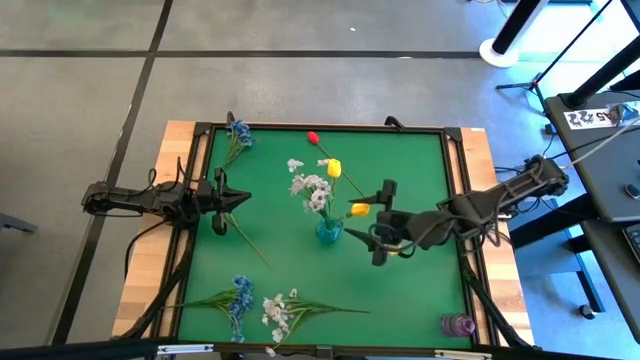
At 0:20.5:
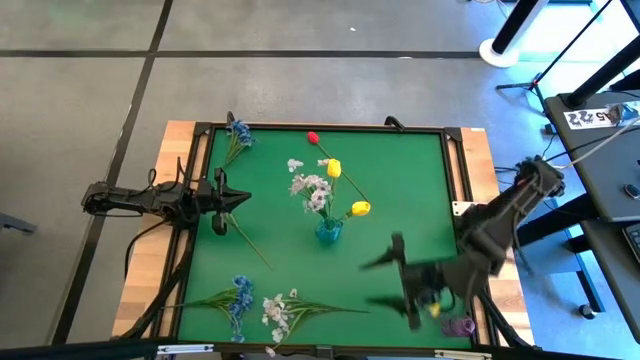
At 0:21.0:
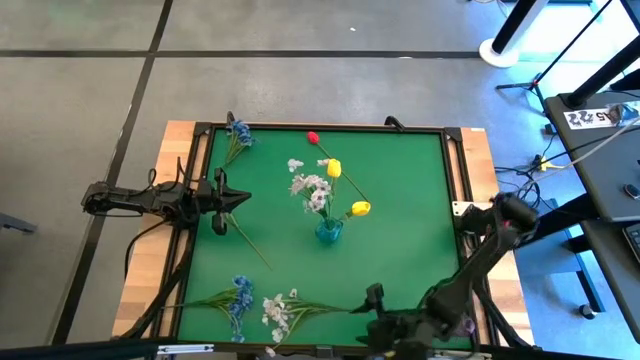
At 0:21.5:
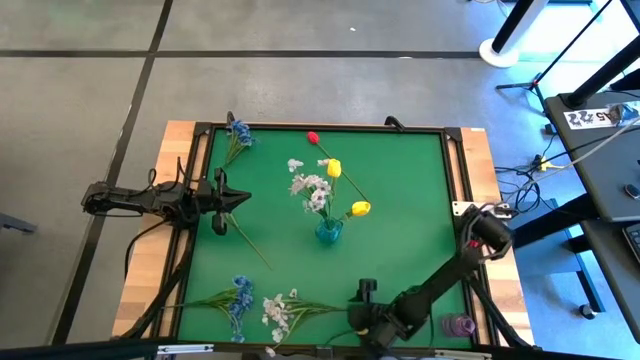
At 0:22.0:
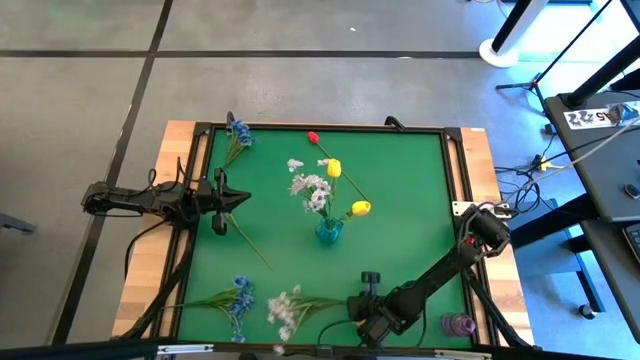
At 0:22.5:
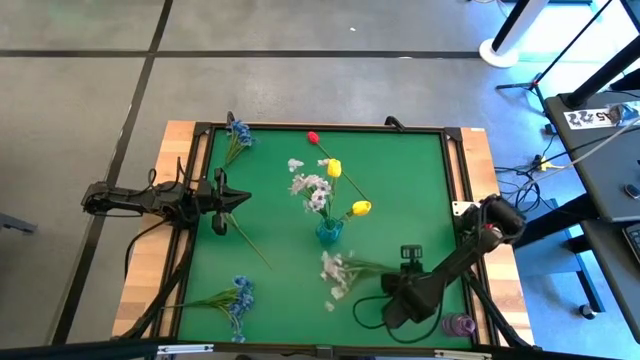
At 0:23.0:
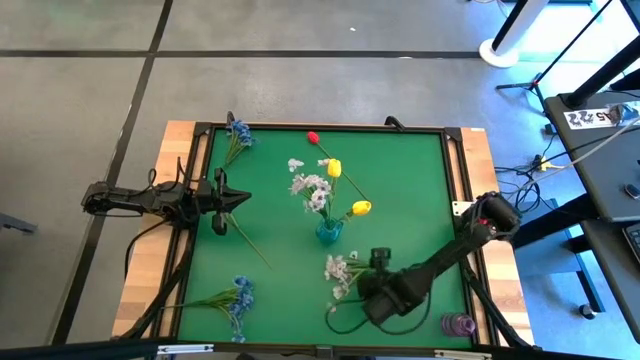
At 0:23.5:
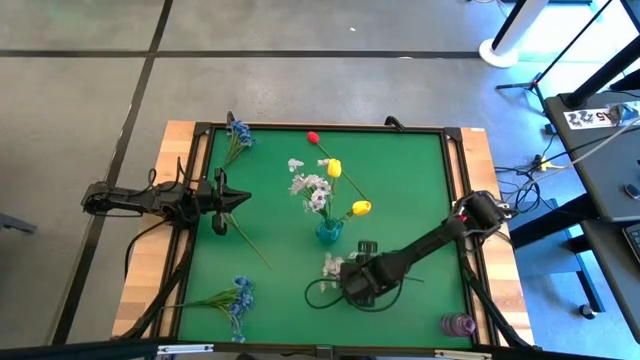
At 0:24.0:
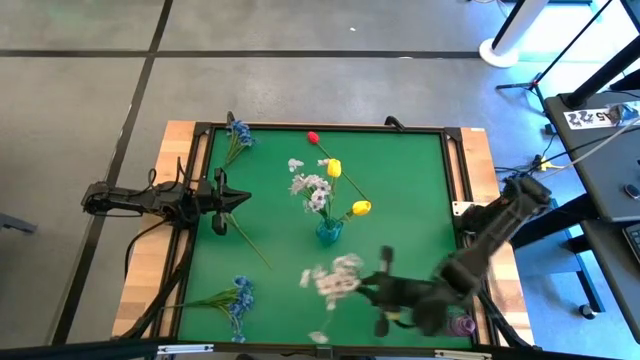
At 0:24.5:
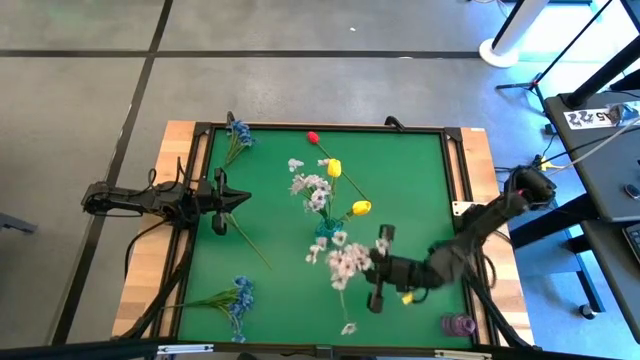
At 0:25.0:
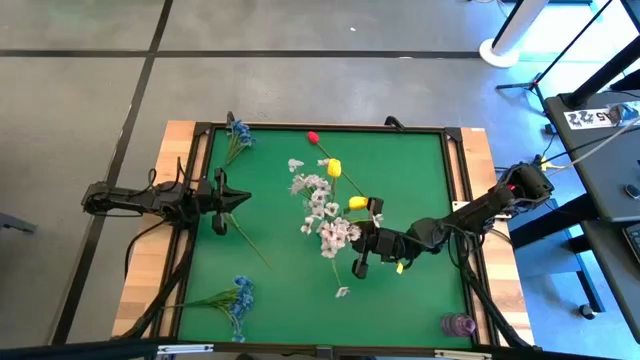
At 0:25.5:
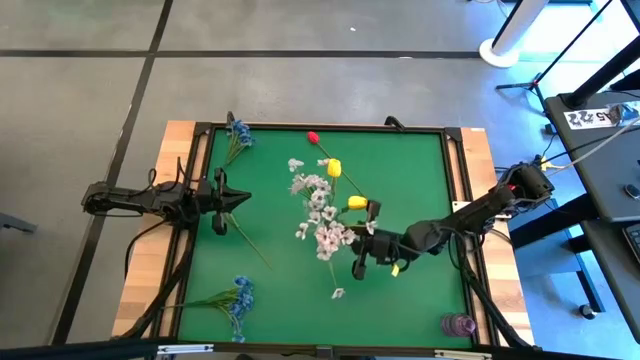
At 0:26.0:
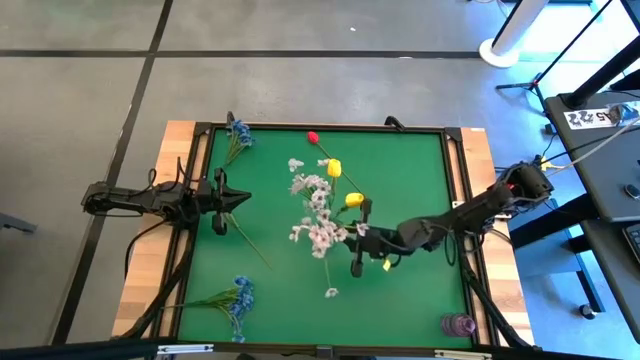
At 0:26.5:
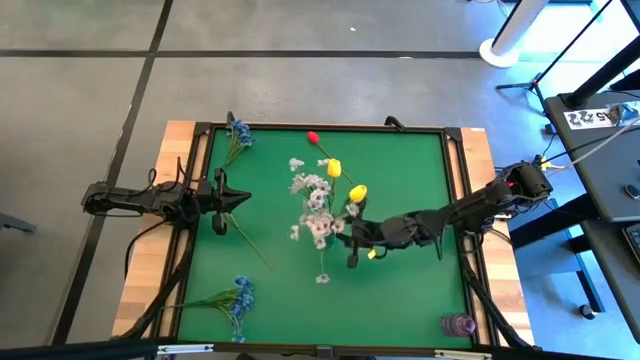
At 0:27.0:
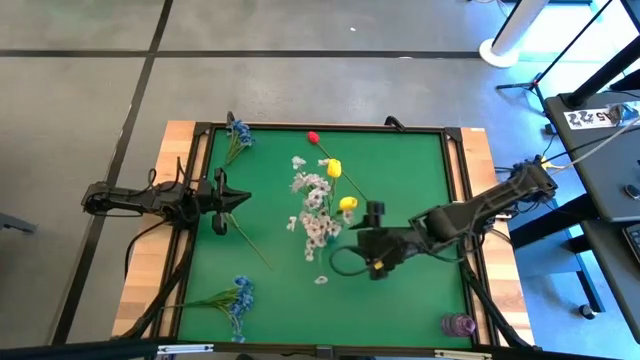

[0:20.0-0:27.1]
Task: Sort flowers into vase by color
Put the white flowers into the blue flower vase

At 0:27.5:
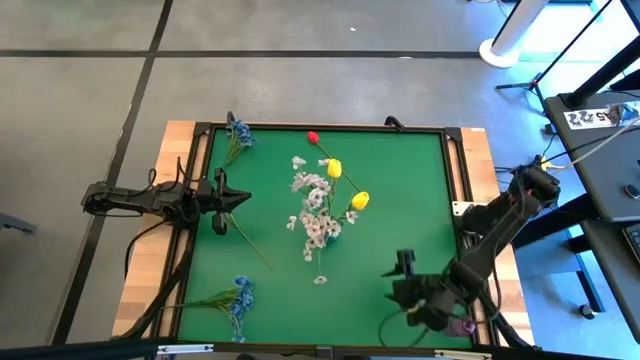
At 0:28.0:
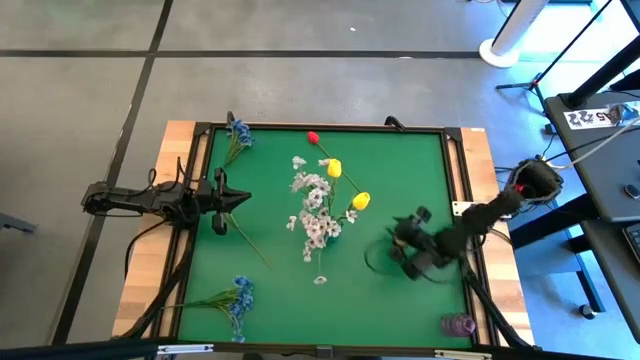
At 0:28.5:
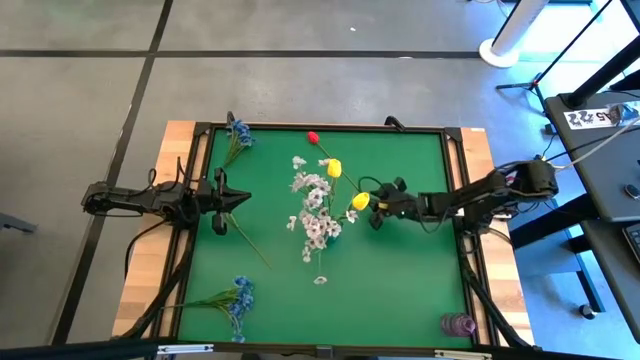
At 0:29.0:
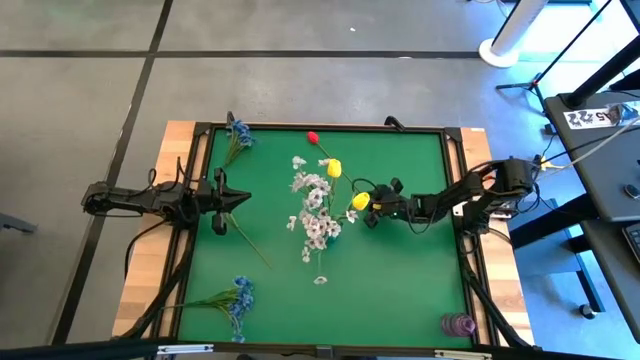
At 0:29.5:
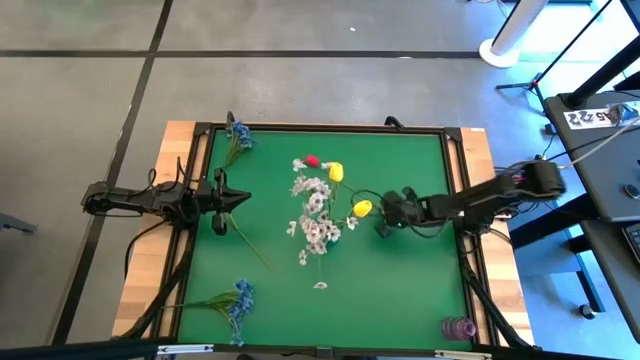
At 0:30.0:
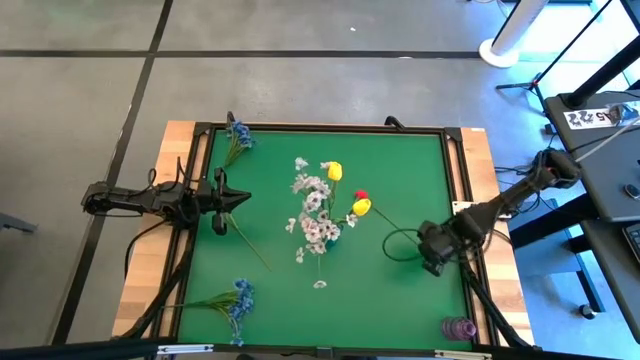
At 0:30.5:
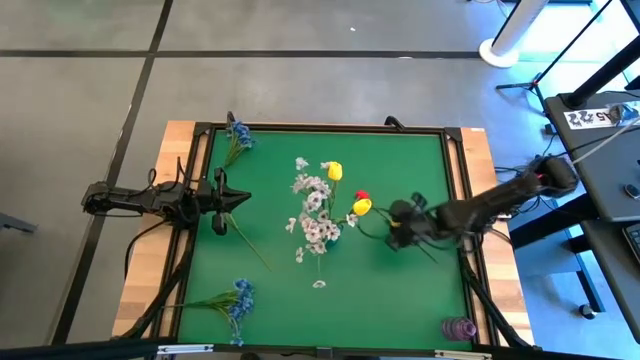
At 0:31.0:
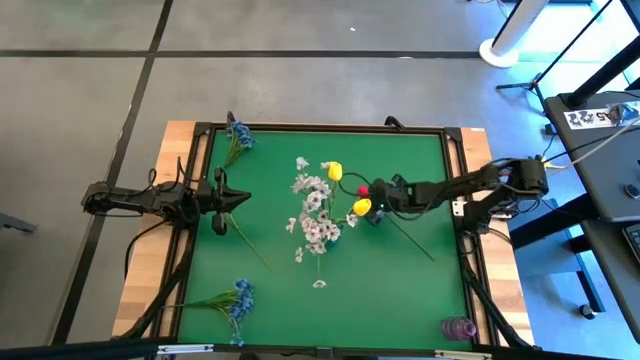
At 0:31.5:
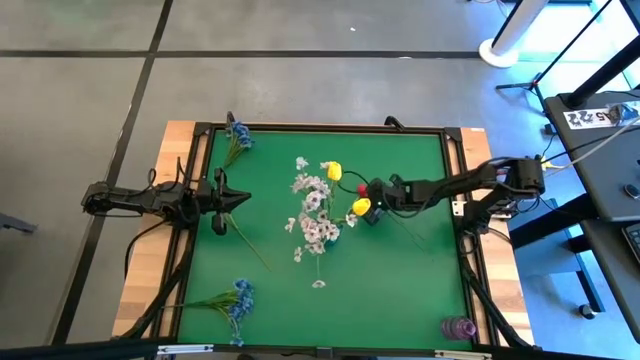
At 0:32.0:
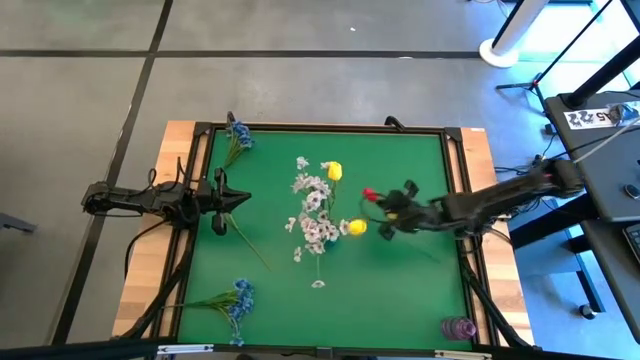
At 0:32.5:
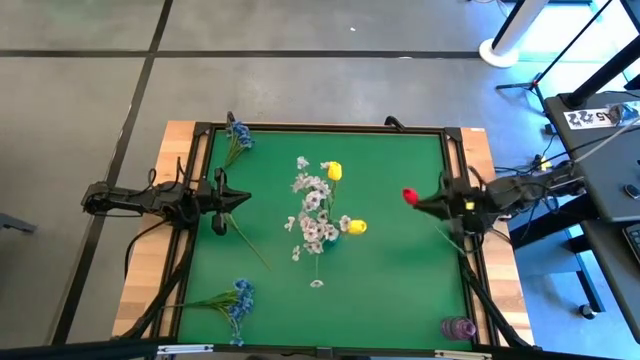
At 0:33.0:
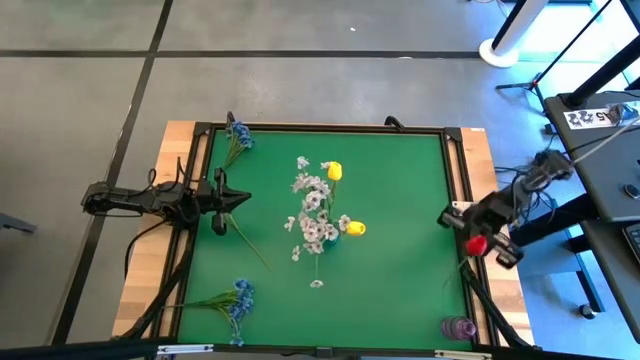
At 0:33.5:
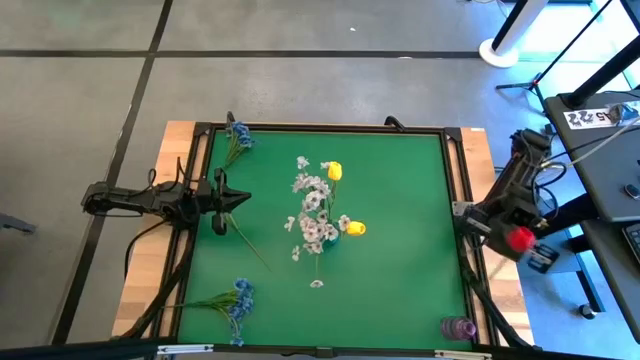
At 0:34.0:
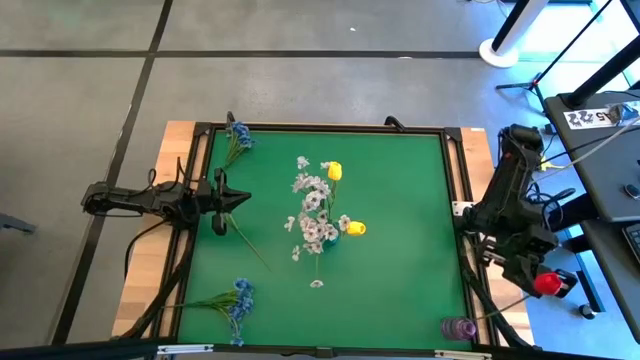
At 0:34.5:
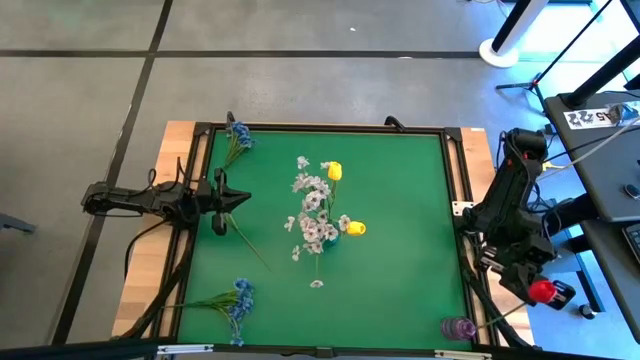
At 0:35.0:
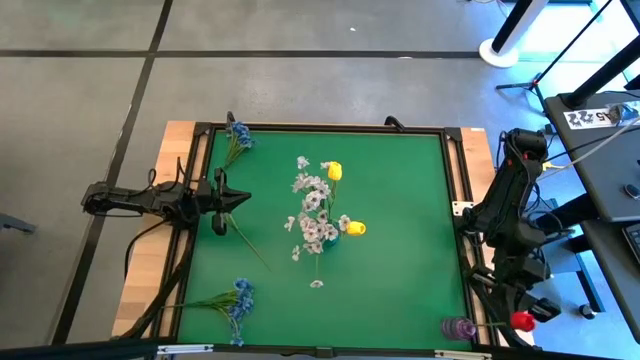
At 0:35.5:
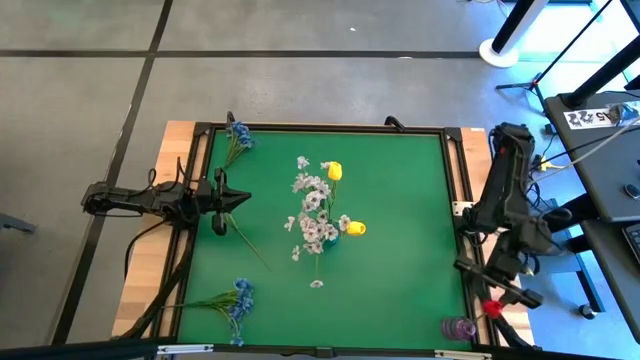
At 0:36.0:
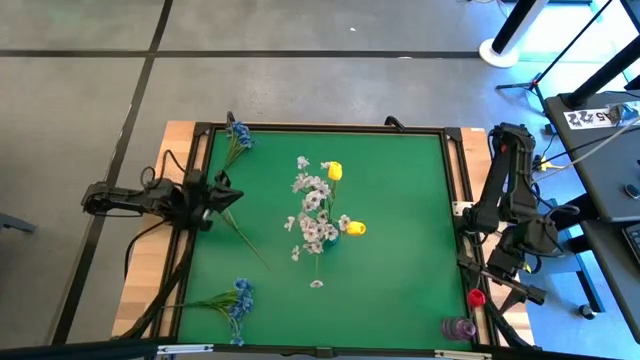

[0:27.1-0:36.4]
Put the top red flower into the purple vase

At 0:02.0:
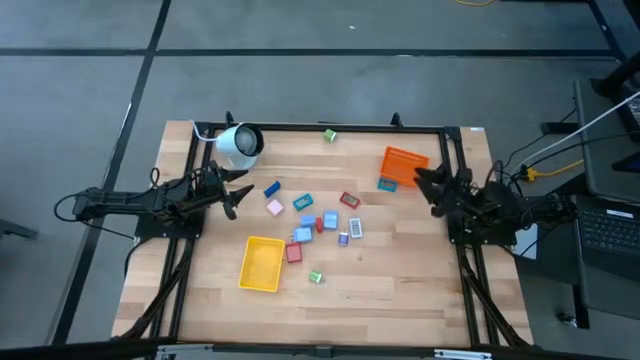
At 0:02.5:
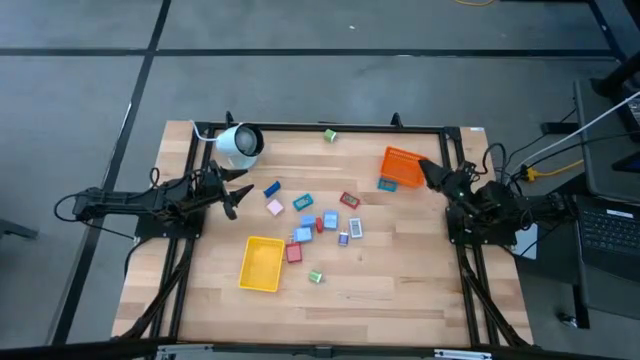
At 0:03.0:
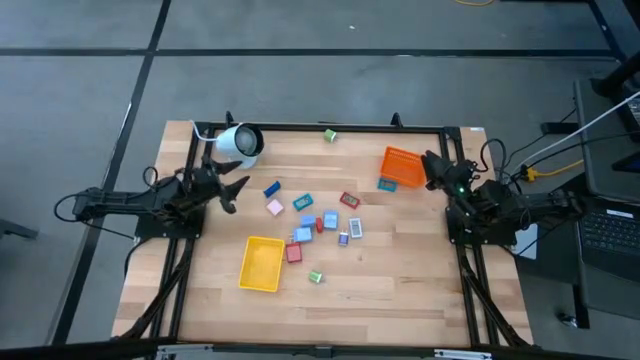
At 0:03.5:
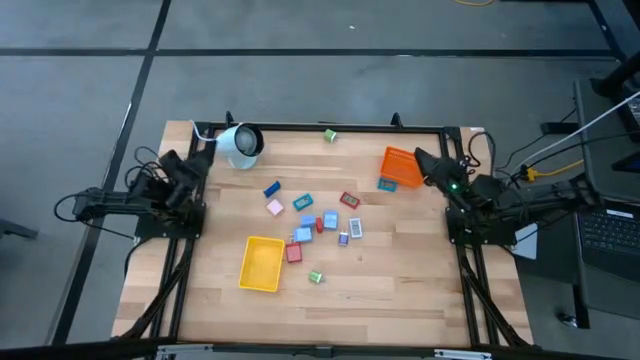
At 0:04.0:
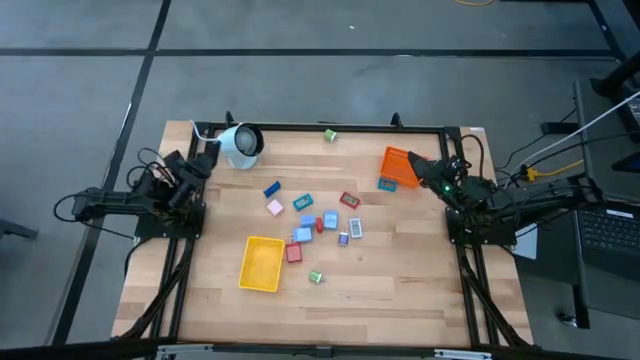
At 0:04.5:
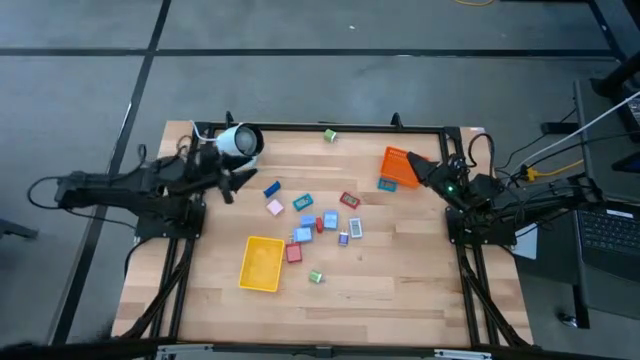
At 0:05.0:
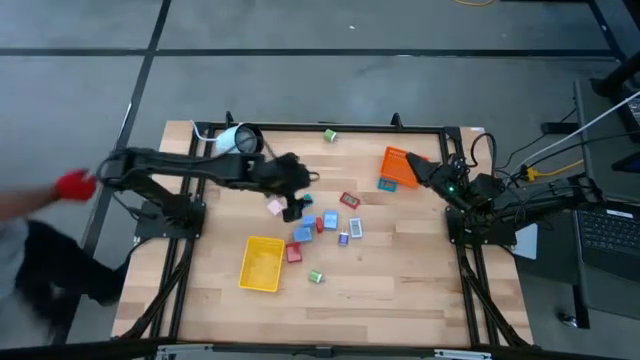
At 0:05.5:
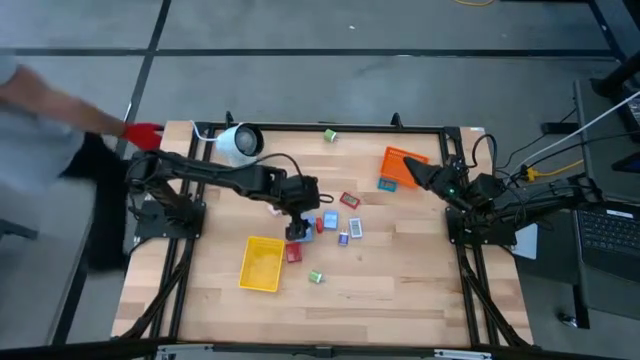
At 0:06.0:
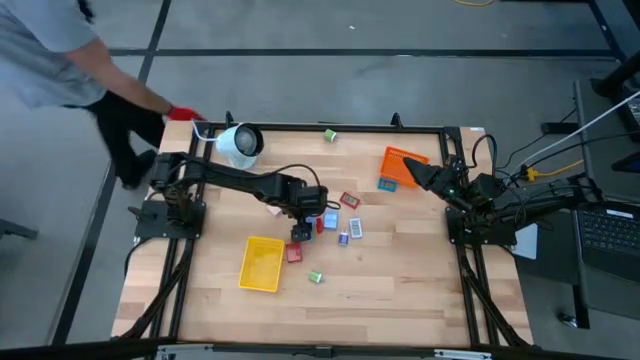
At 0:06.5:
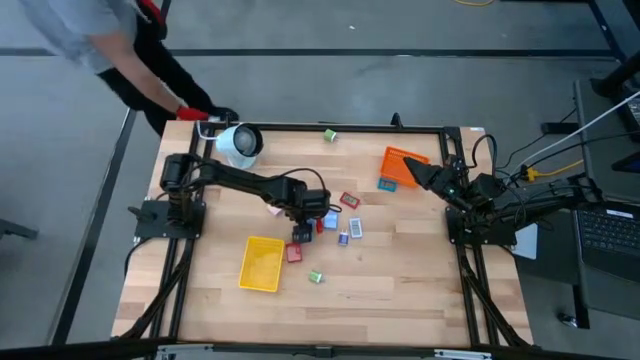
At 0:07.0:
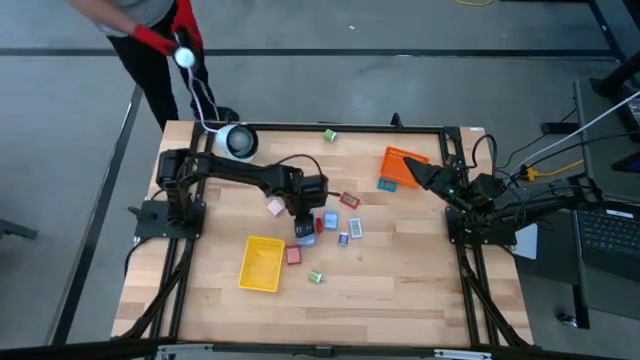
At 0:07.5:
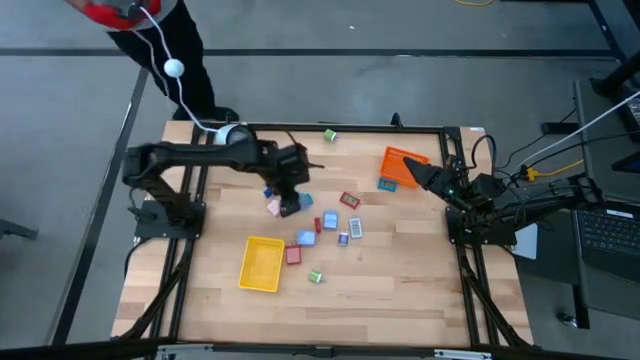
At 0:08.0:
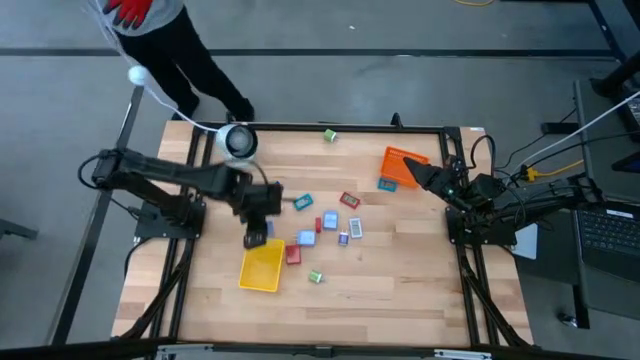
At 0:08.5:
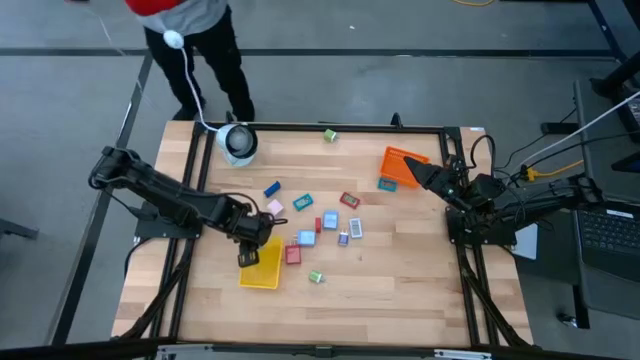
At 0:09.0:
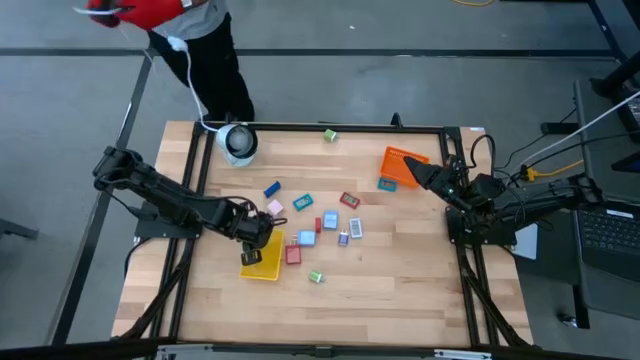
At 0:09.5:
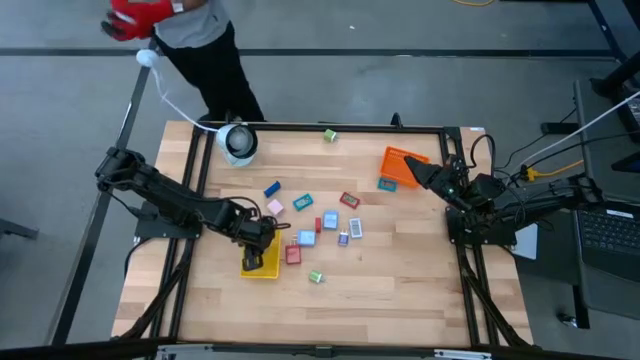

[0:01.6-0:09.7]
Task: Pick & Place Office items
Put the top left light blue charger adapter into the yellow bin
